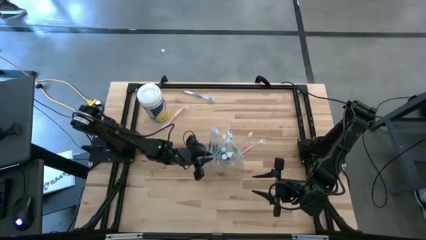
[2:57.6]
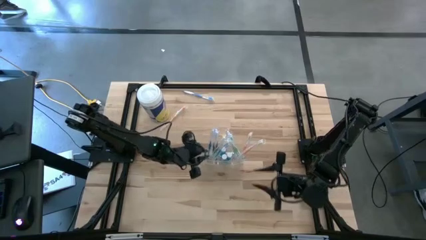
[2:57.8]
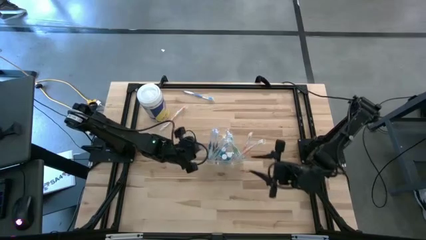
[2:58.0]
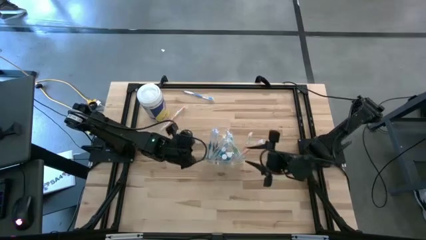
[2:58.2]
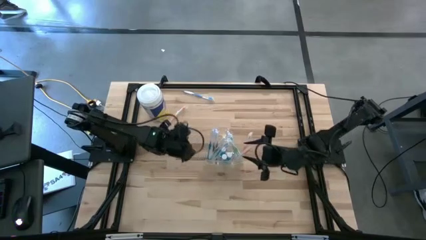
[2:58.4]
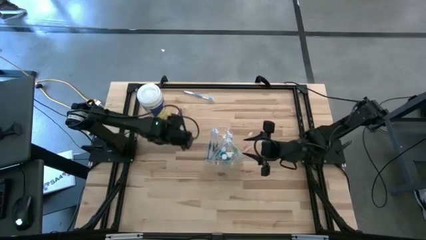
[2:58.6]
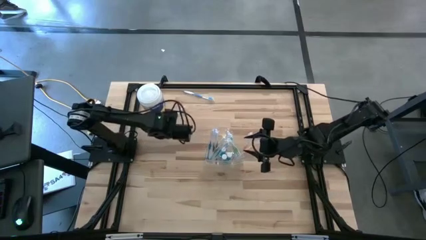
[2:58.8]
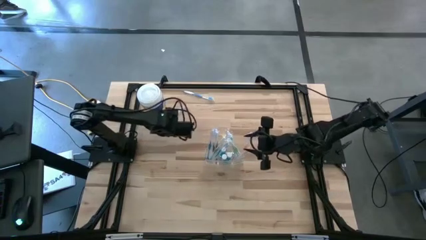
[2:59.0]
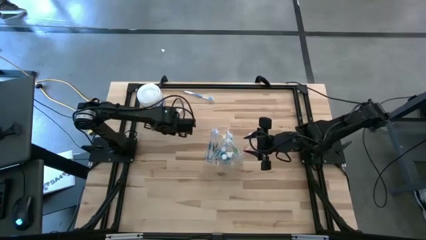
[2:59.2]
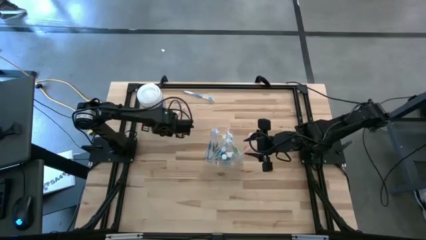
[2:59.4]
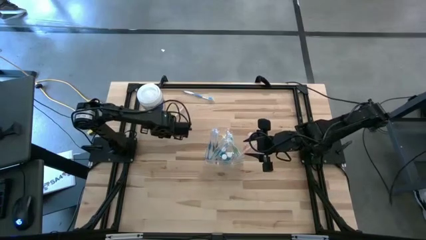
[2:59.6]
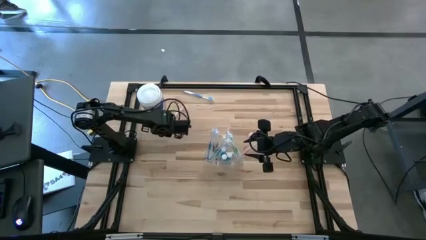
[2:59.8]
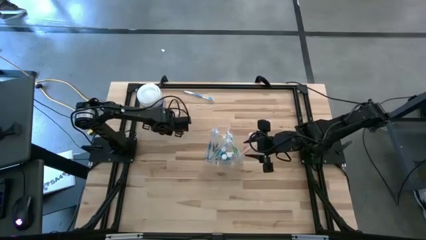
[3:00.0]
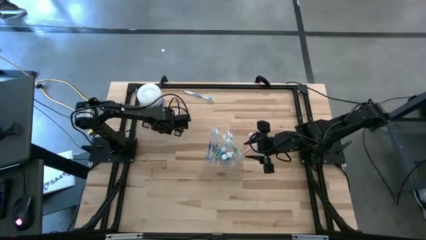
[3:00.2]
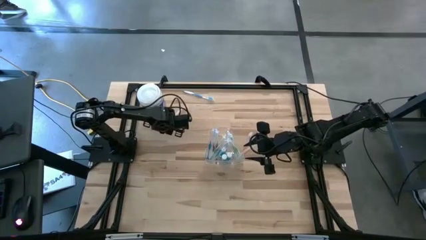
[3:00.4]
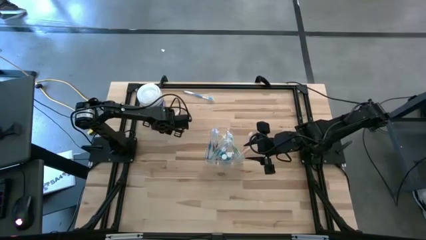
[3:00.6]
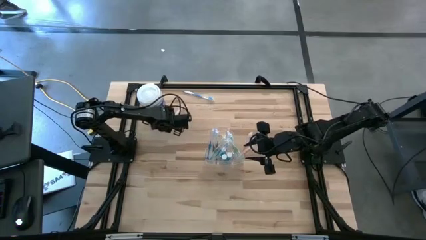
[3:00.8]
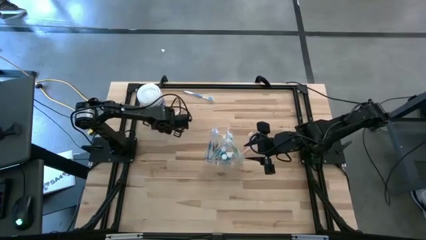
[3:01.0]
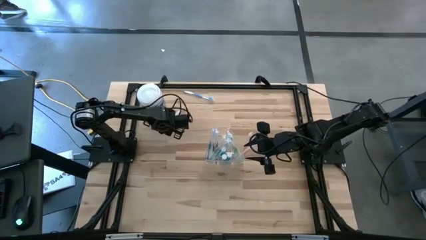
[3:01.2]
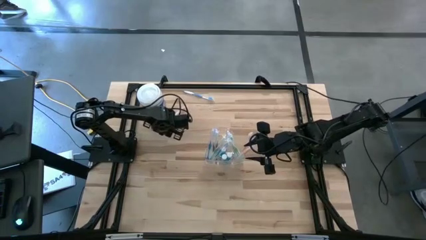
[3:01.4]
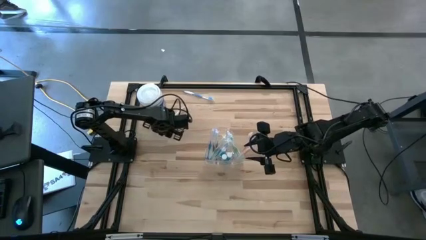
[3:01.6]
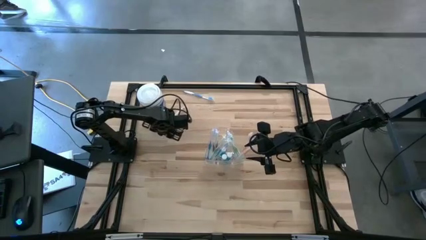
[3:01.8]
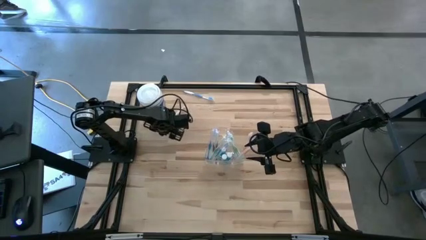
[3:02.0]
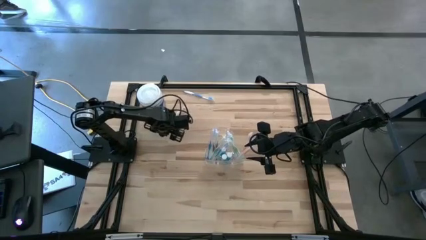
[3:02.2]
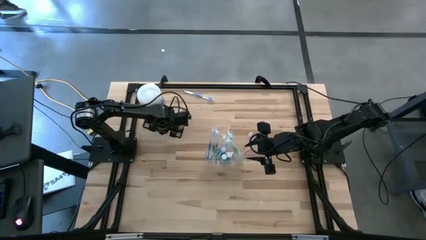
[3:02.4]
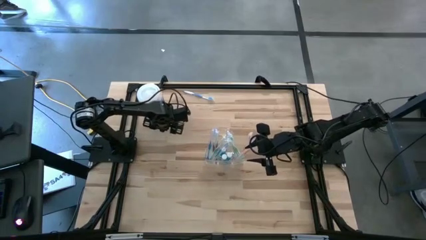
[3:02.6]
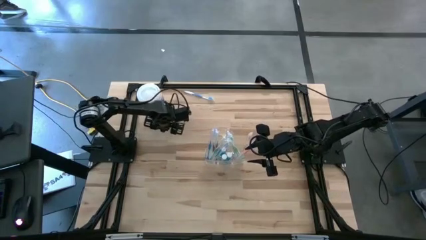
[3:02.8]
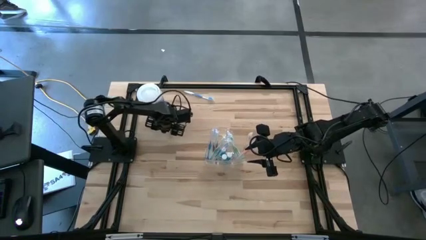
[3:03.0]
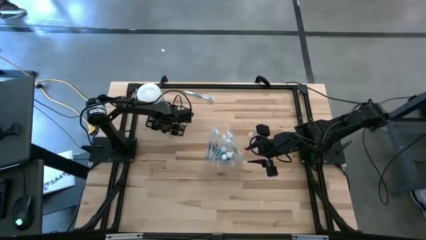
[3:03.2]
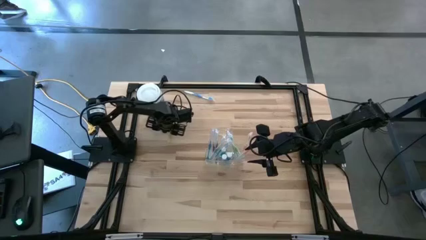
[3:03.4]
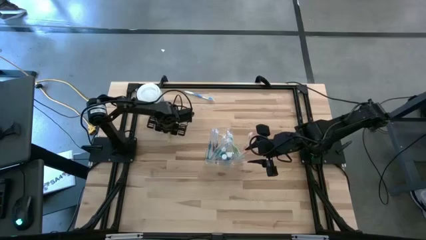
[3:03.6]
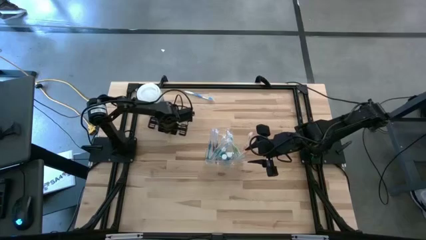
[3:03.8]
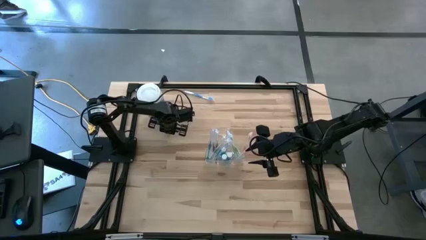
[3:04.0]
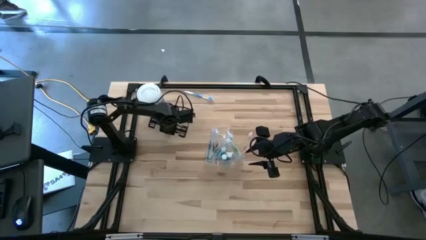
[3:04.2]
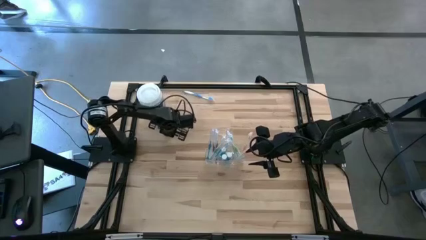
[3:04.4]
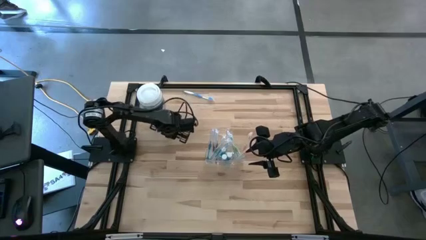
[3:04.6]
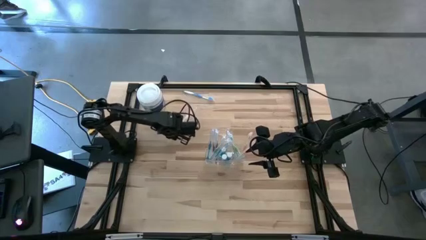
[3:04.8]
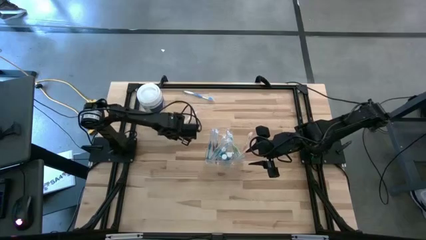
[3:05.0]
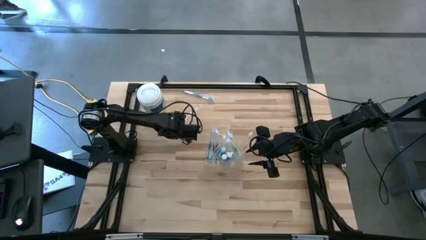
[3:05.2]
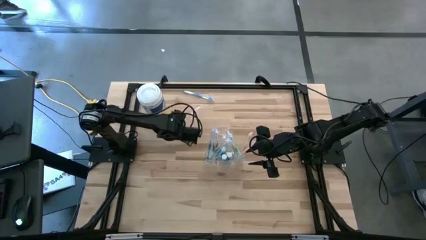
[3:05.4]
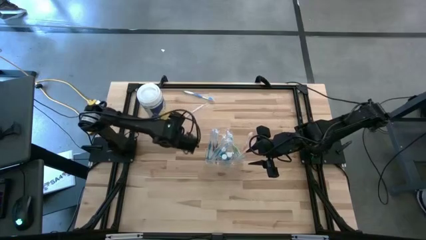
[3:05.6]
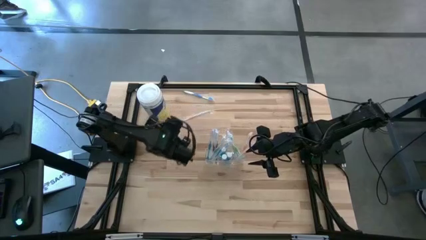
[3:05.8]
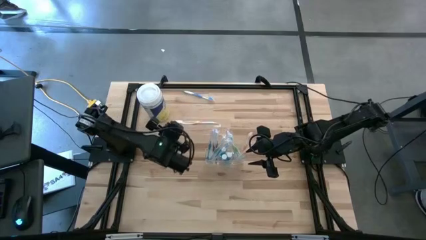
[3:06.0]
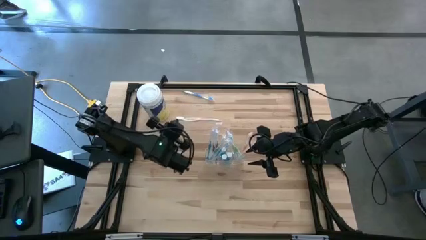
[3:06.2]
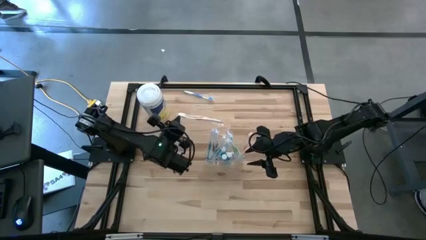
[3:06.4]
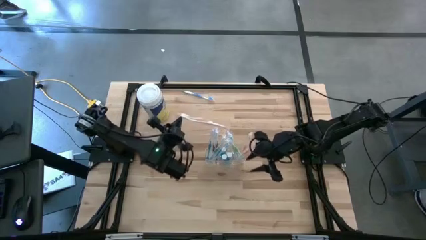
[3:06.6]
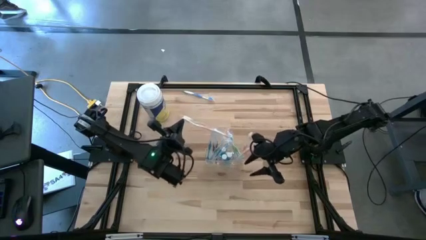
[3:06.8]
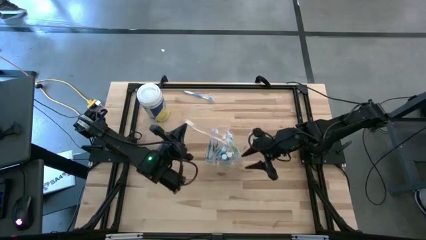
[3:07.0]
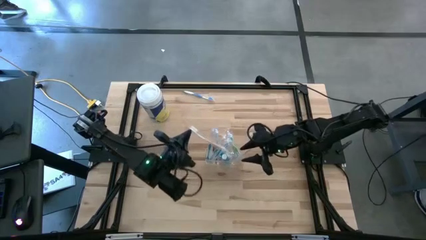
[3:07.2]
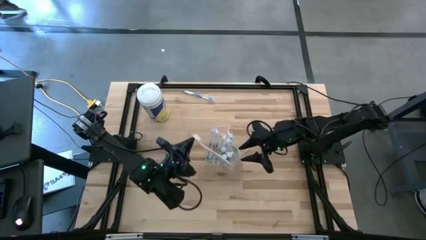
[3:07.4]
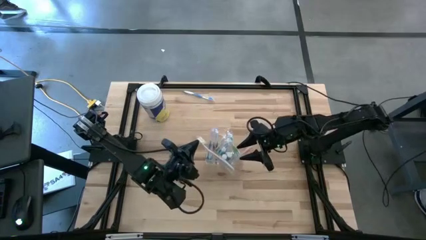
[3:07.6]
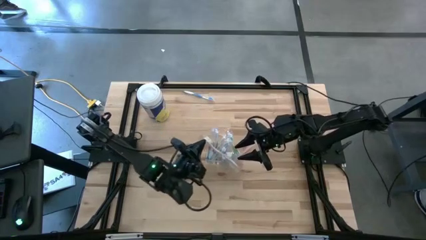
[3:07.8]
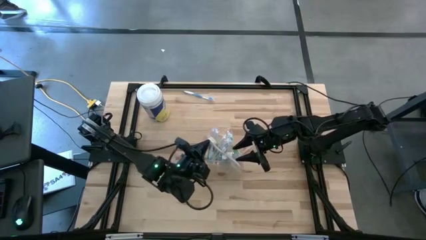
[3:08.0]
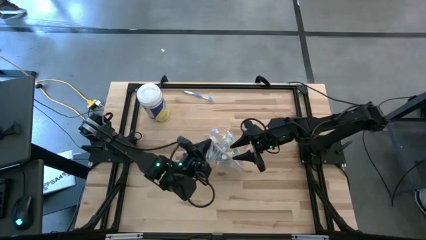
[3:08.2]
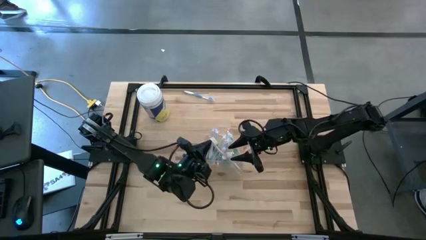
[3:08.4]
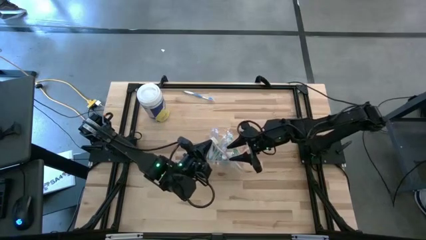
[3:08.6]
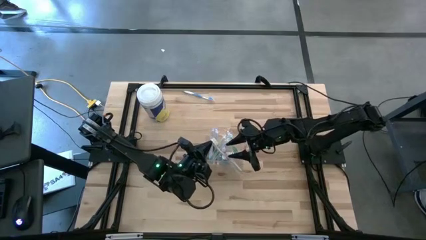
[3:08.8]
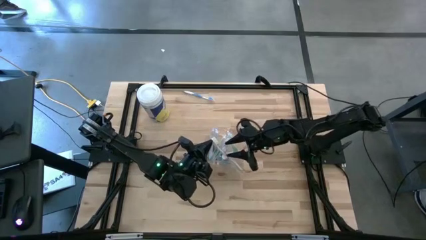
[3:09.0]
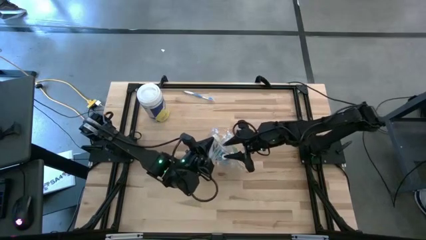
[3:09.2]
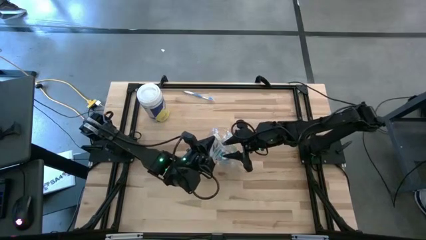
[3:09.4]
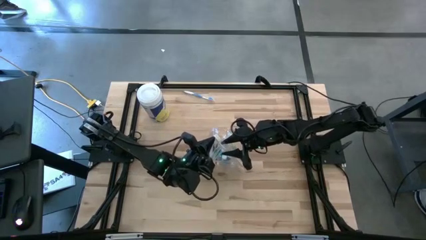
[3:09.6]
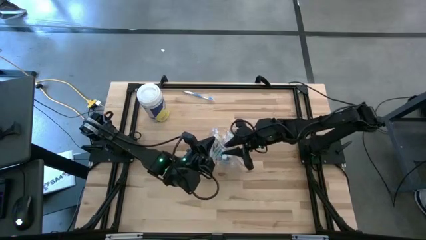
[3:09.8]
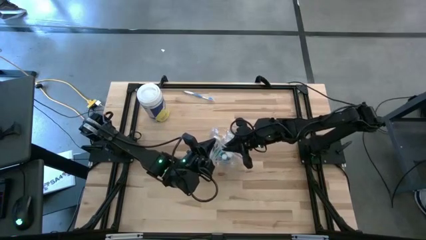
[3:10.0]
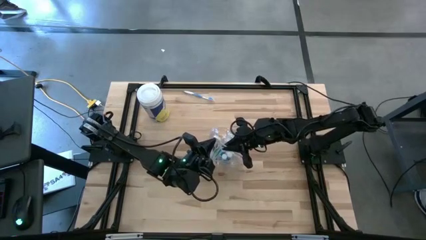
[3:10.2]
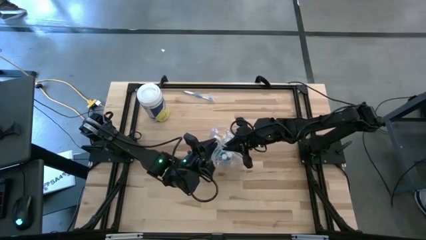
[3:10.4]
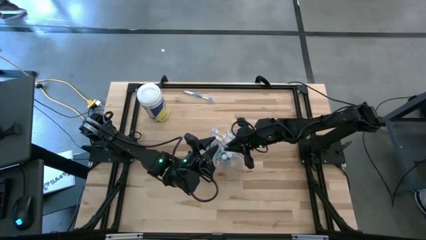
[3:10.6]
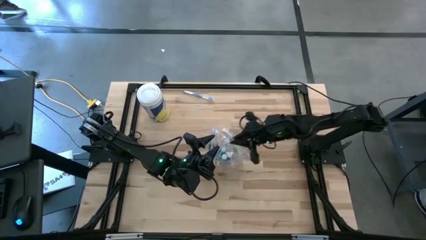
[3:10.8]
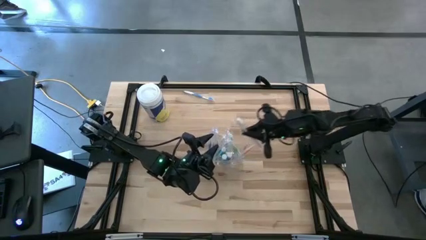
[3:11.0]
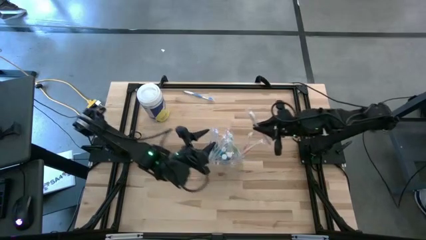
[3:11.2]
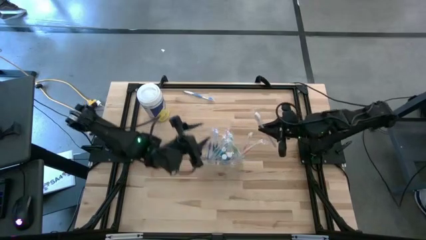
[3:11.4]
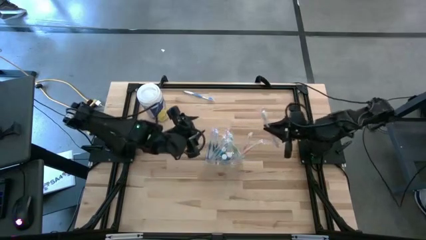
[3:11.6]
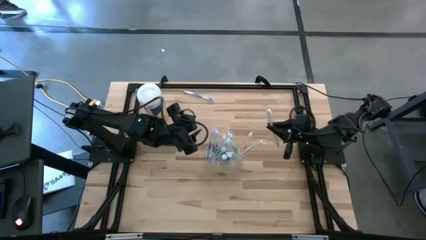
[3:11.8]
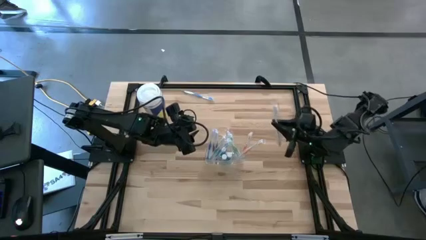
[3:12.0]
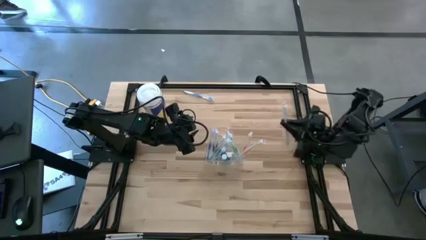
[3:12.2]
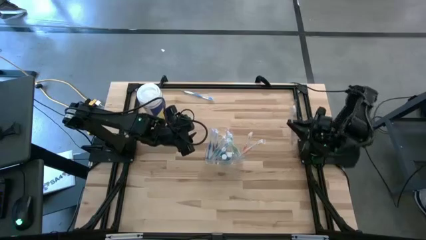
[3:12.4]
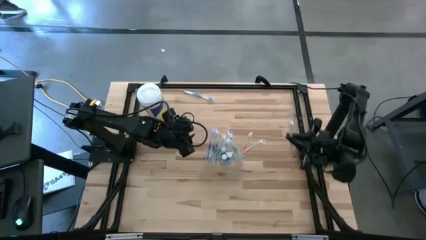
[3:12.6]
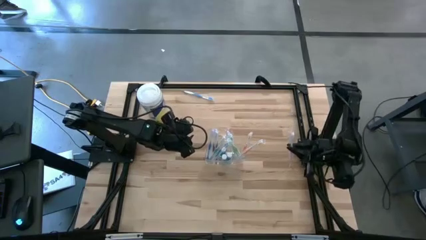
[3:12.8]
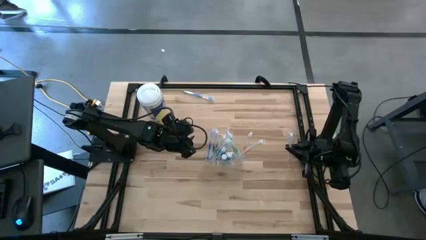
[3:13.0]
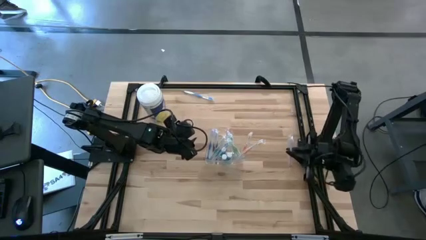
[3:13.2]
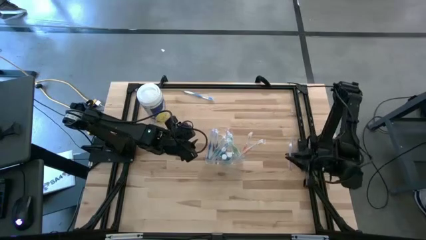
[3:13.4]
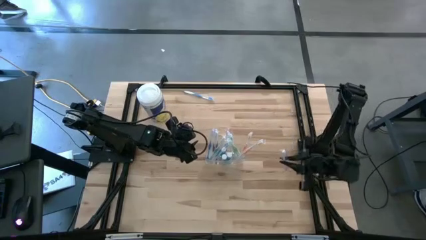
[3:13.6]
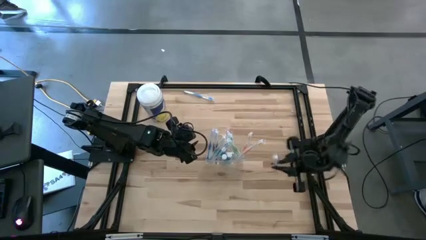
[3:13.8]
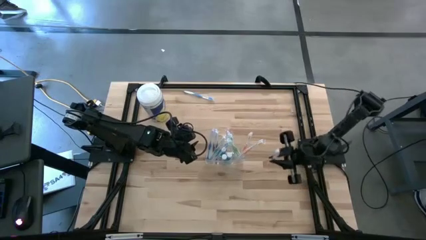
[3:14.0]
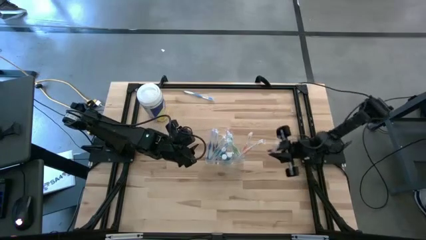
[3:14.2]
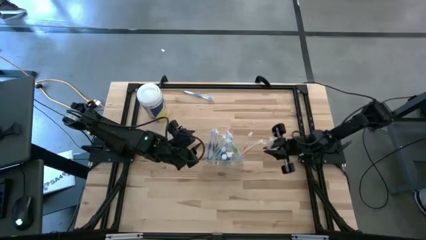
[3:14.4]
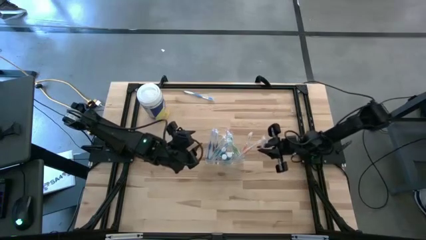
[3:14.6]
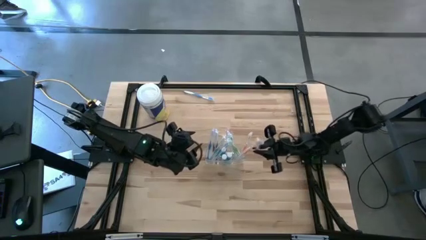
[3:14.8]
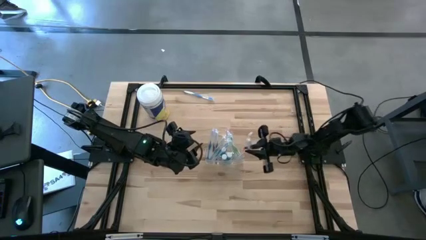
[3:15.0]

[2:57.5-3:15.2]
Task: Pick & Place toothbrushing station
Put the orange toothbrush into the transparent organizer
